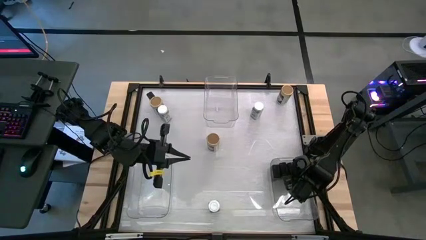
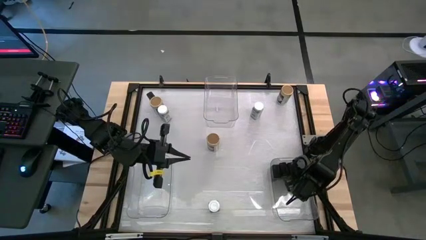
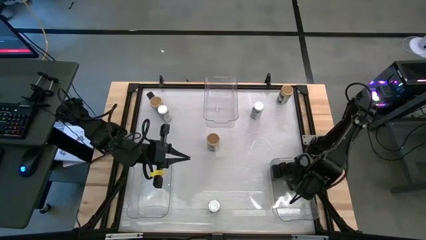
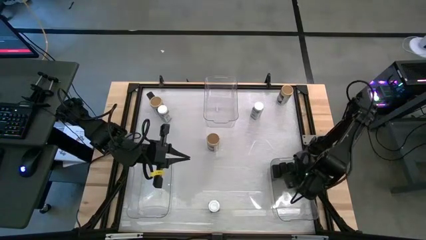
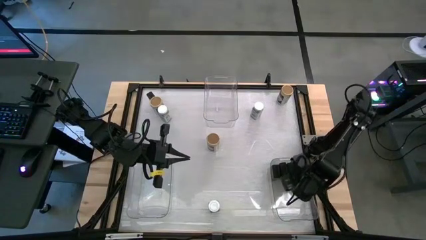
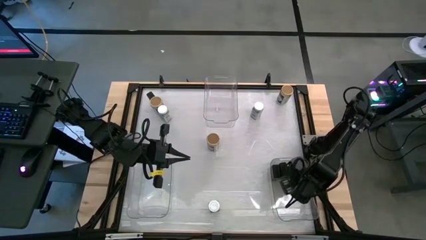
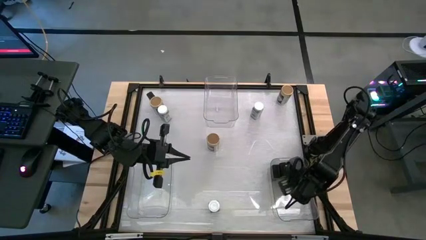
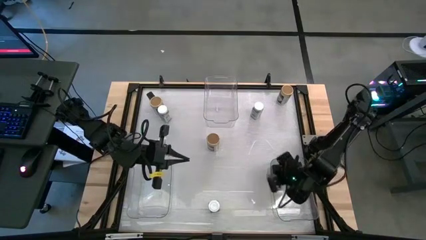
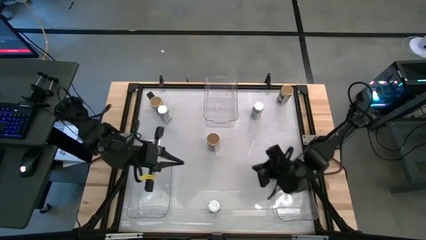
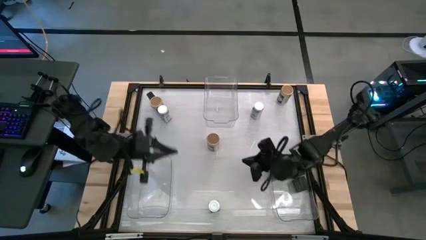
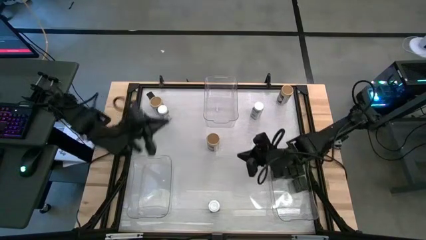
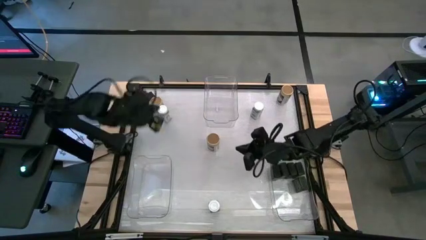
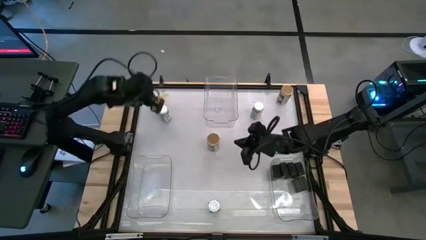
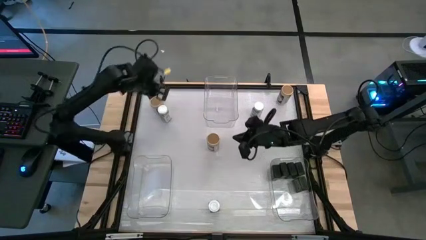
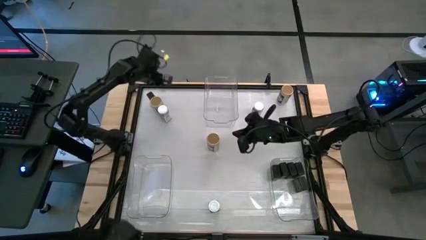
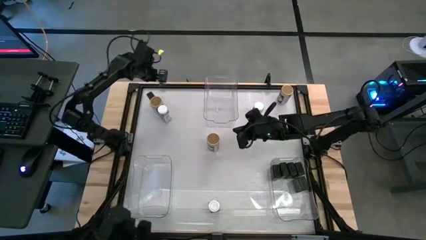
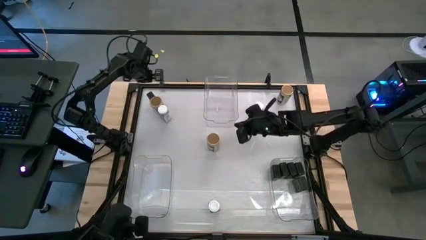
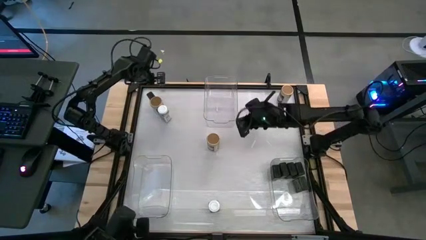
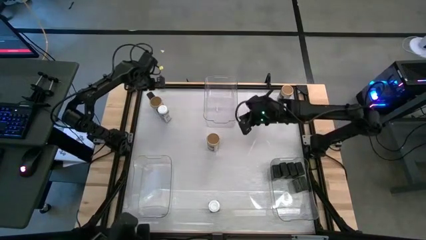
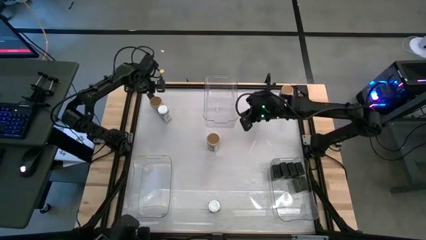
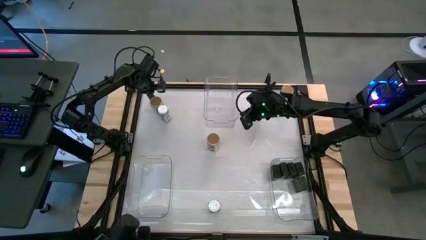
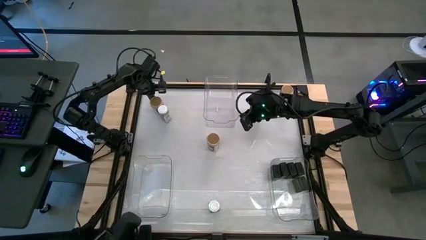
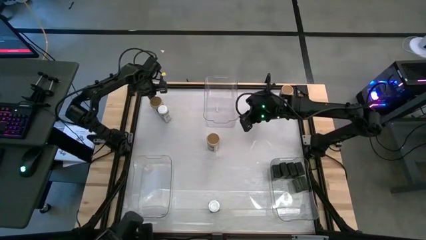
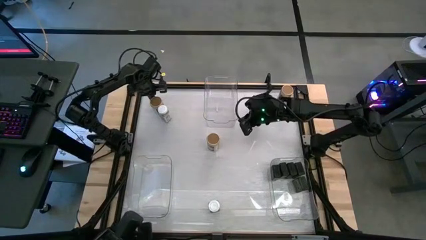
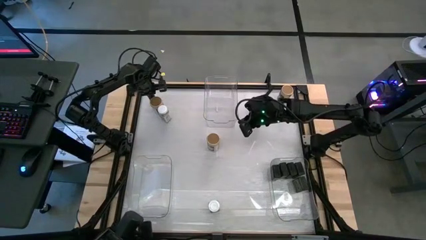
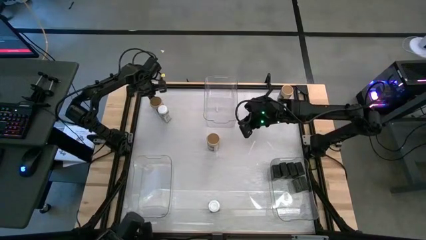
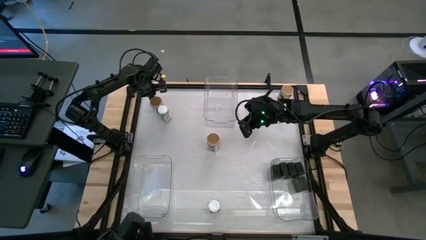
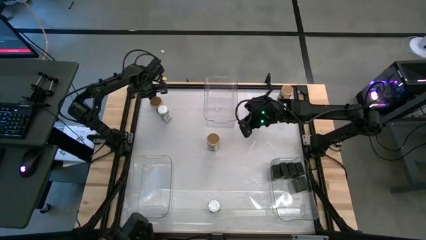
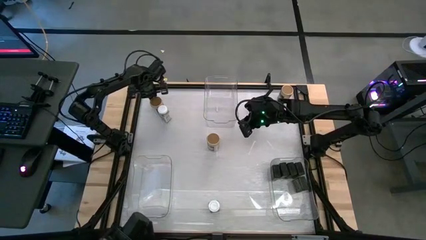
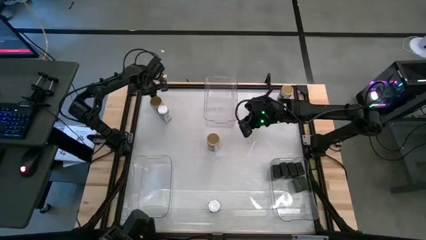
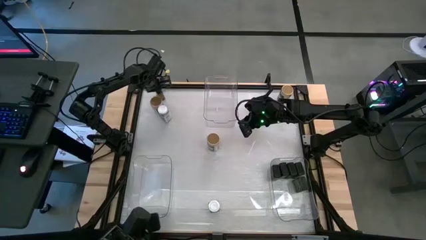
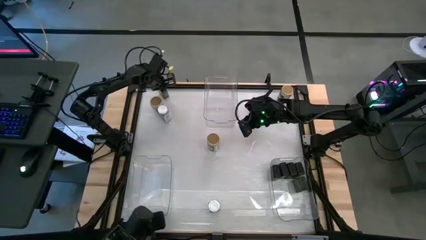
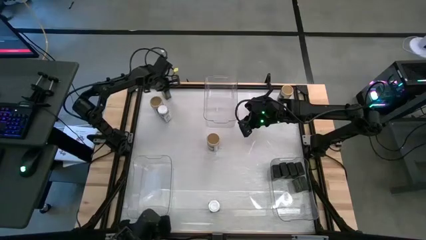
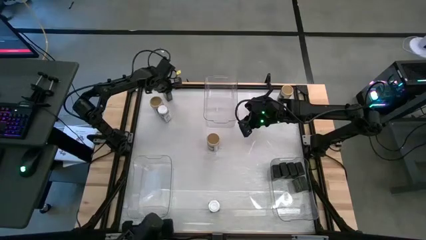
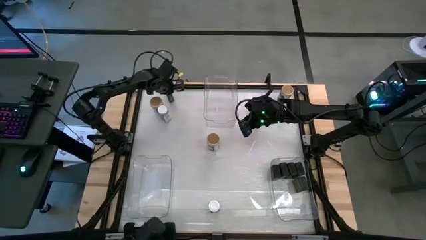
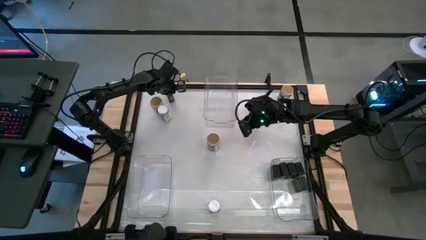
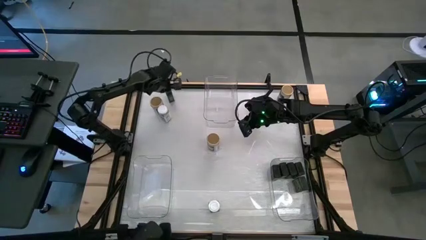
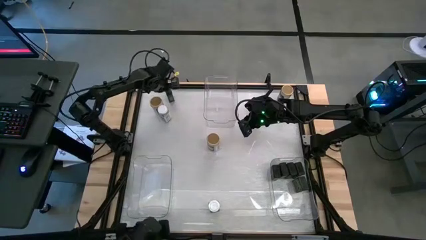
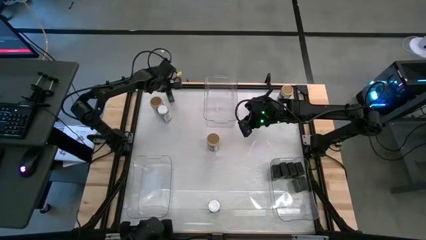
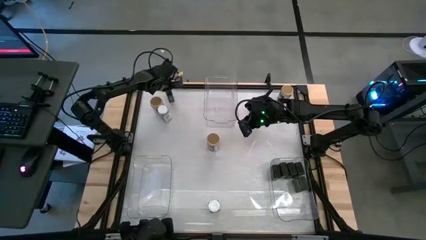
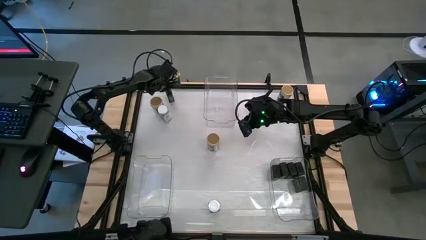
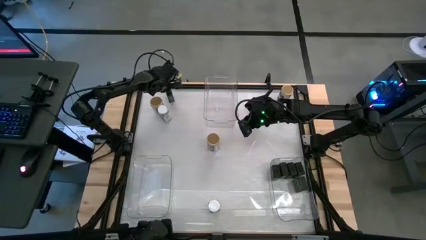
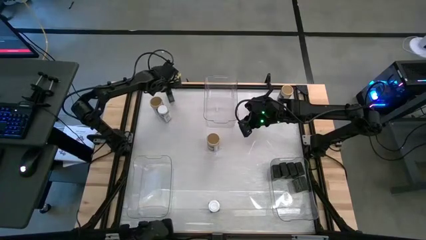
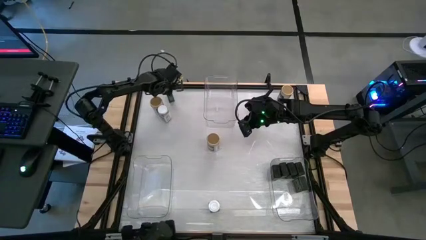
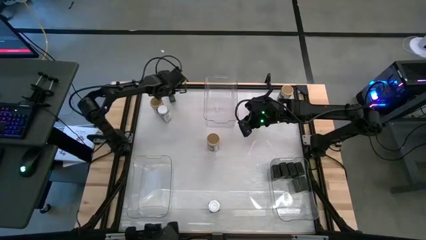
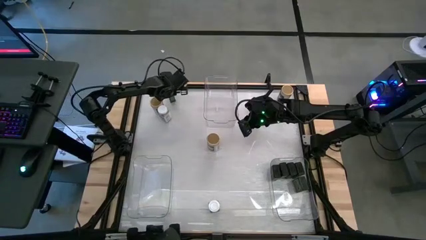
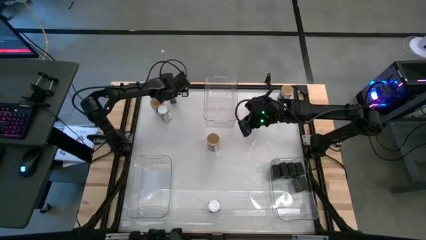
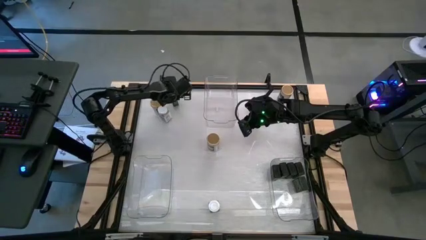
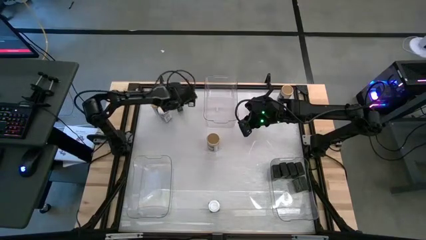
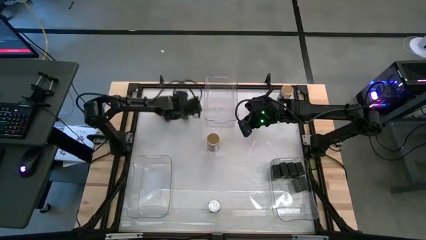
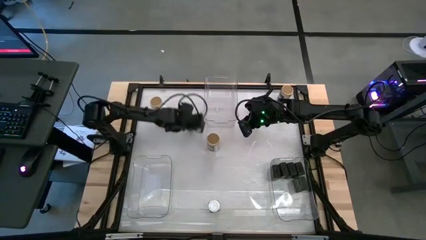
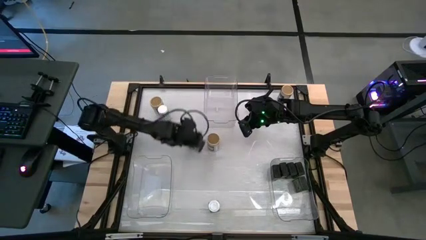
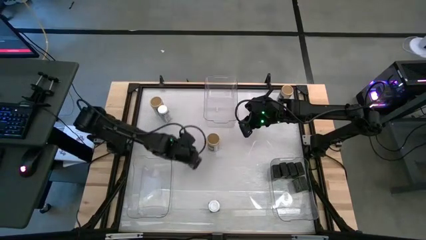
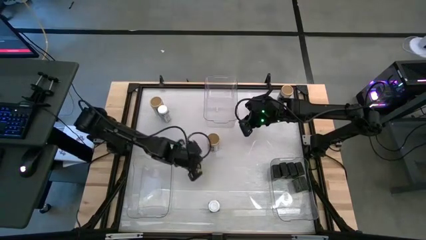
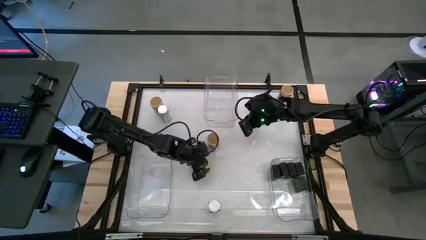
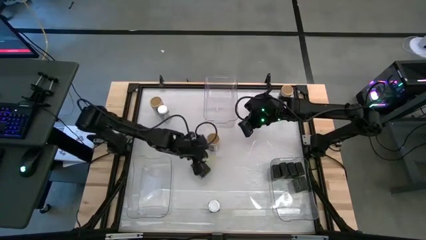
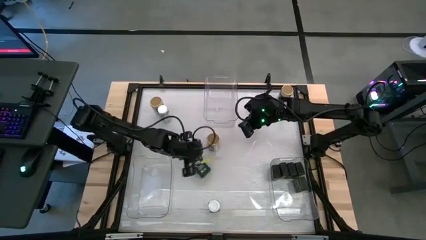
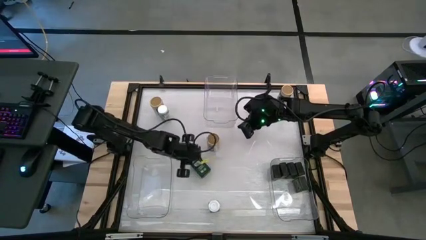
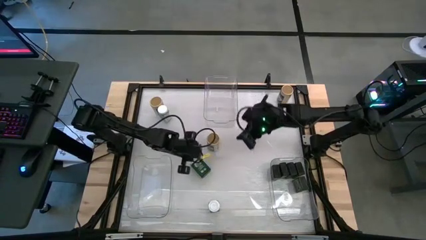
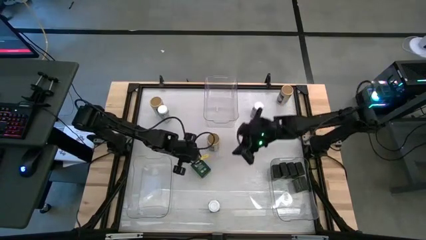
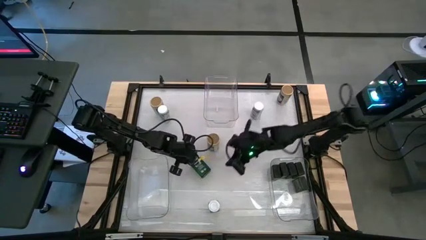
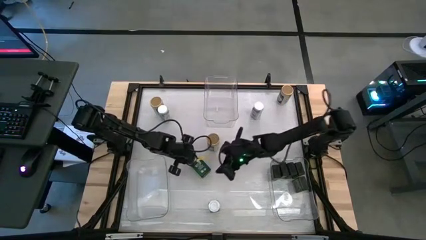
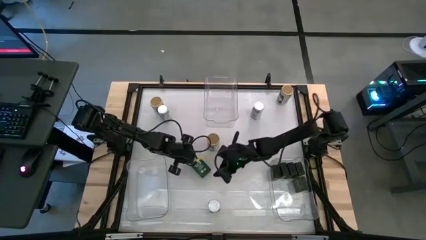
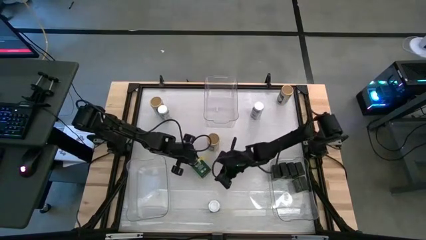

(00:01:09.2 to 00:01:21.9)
Task: Sort spices by type
Put the black spice can into the right transparent bin

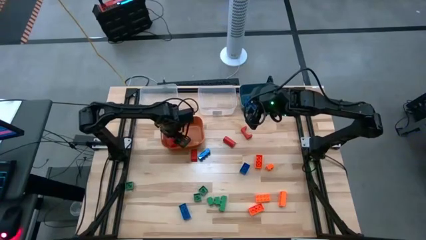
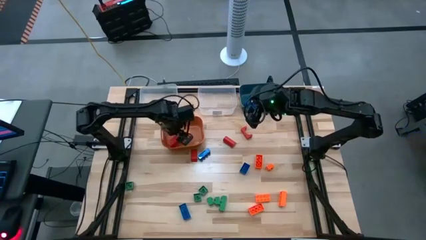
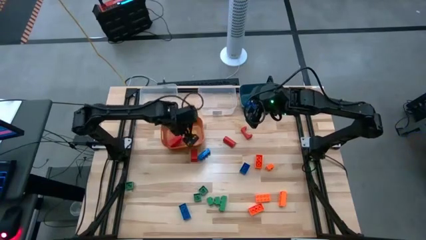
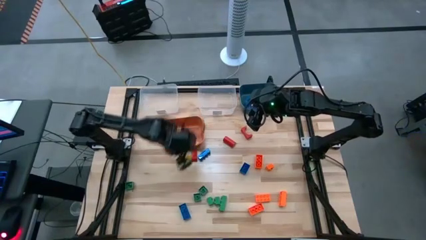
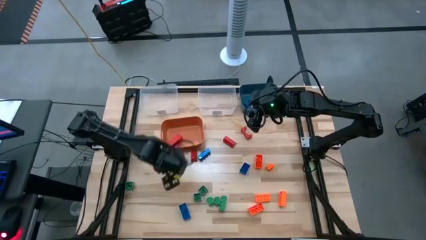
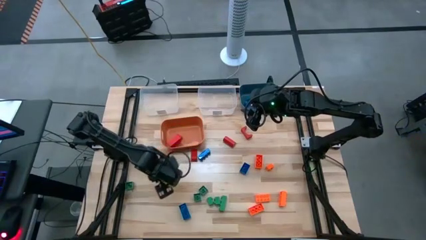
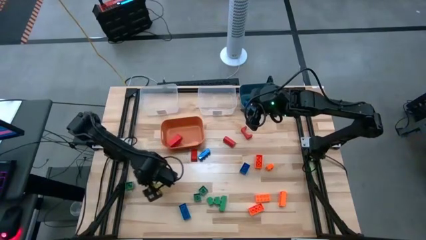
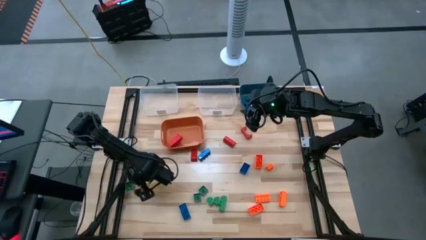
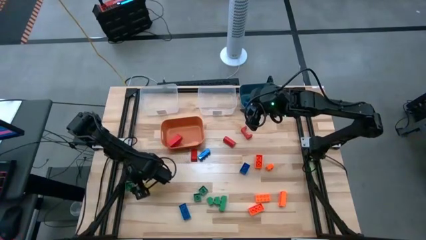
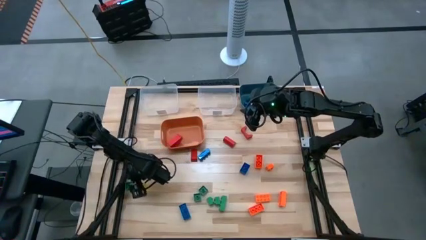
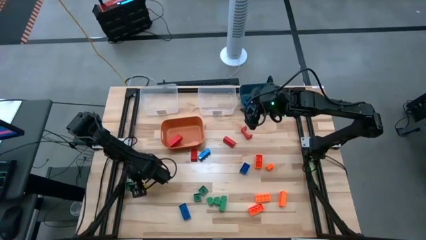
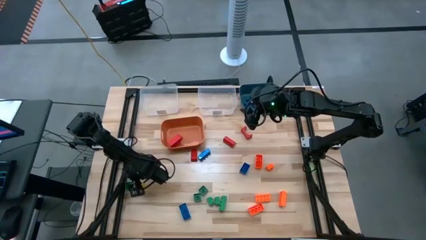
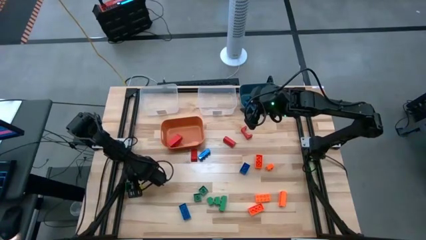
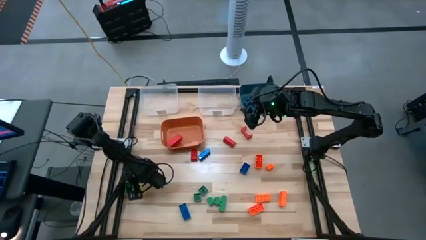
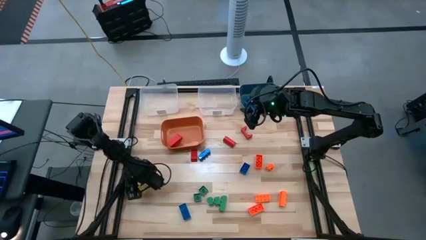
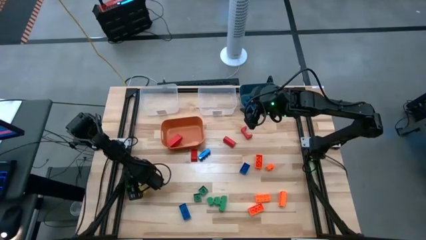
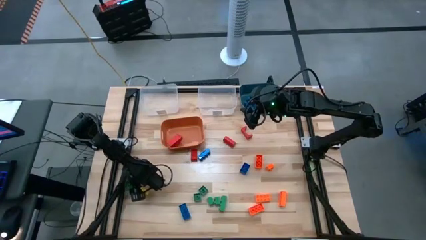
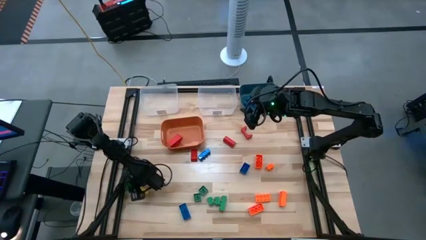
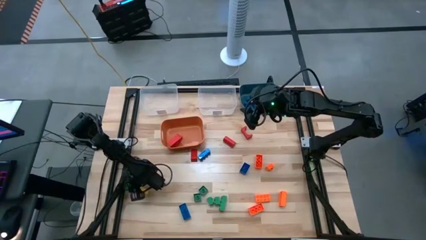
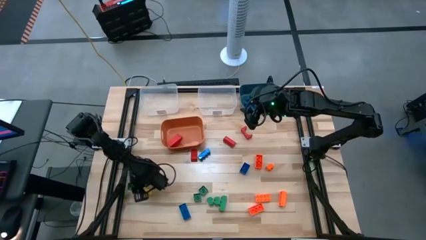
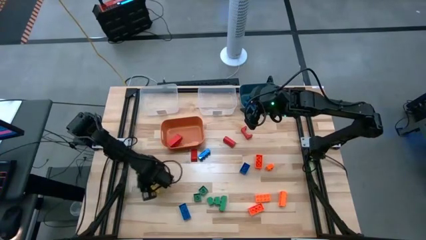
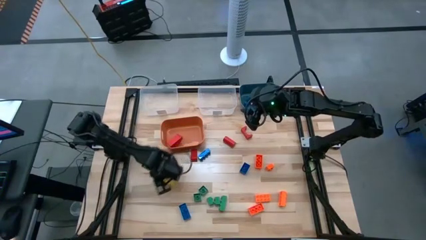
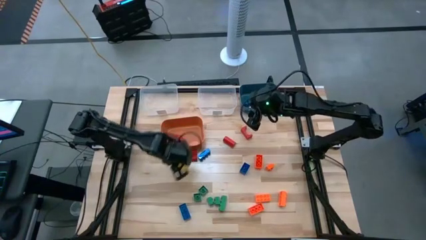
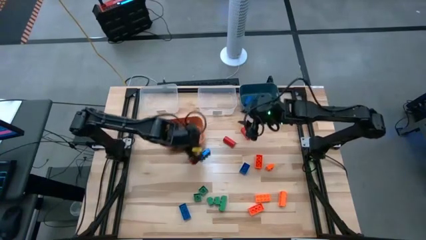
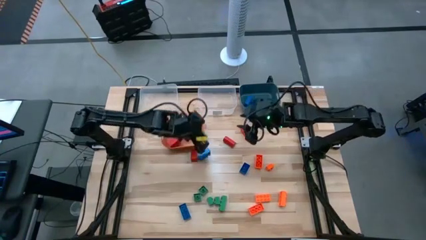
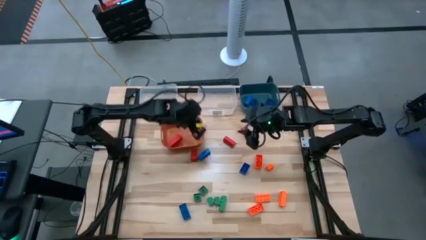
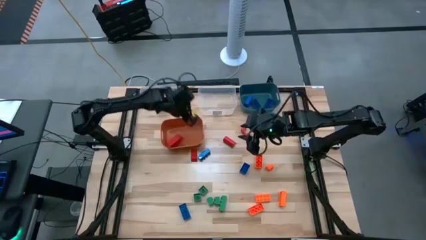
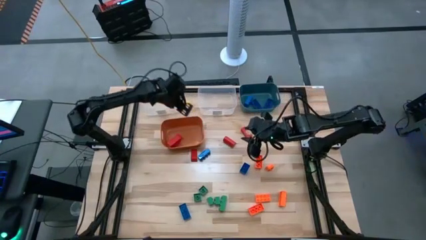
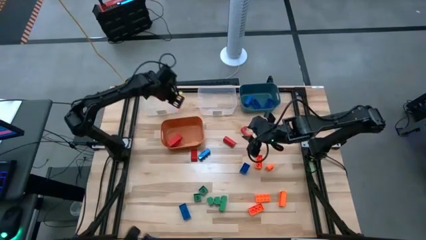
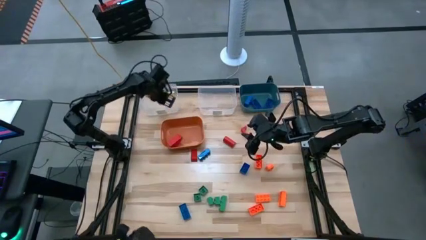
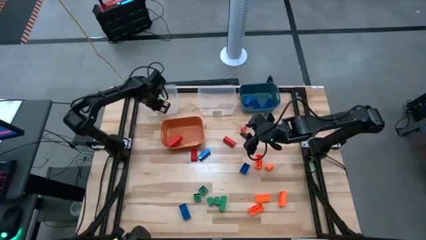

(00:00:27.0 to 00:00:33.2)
Task: Sort blocks
Put the green game piece into the left transparent bin
